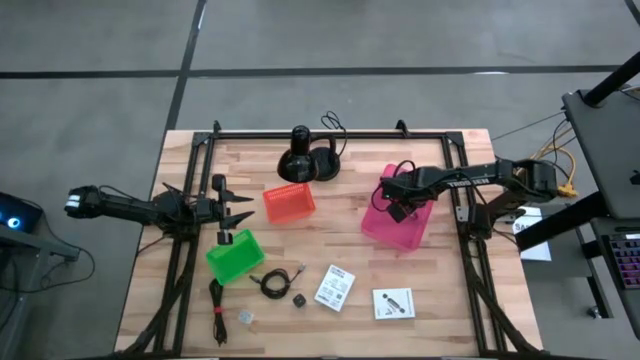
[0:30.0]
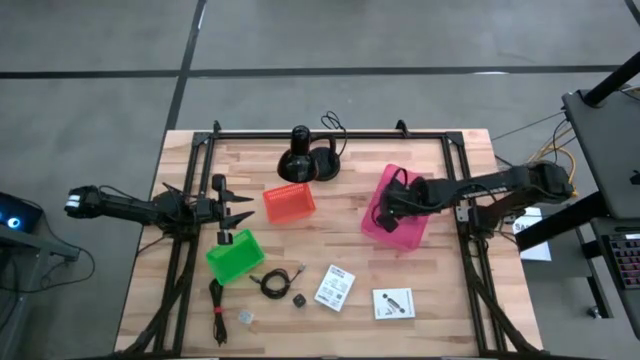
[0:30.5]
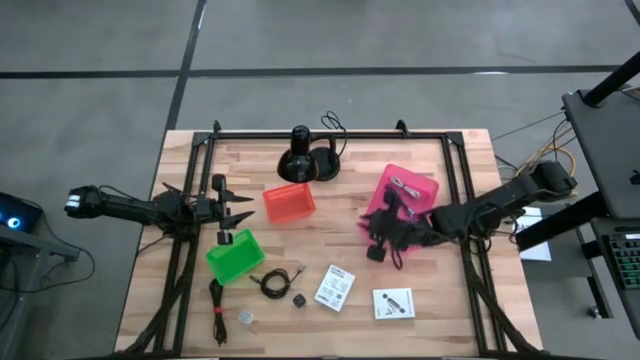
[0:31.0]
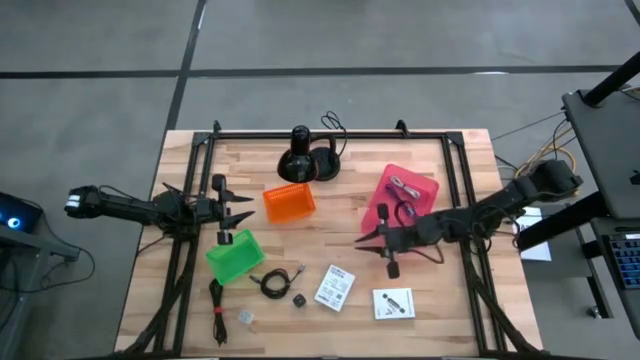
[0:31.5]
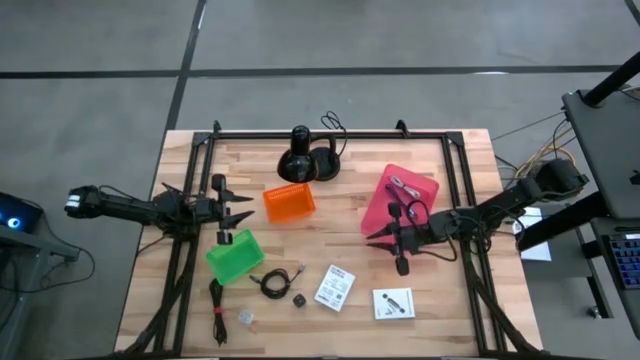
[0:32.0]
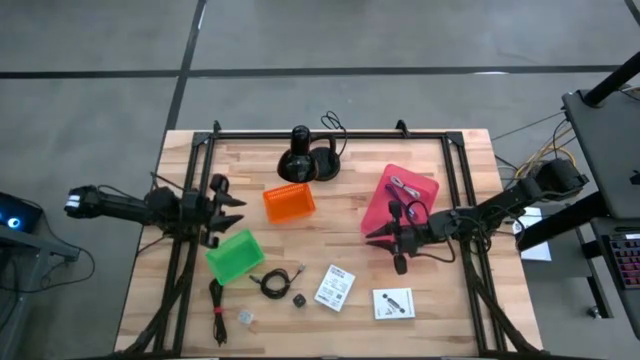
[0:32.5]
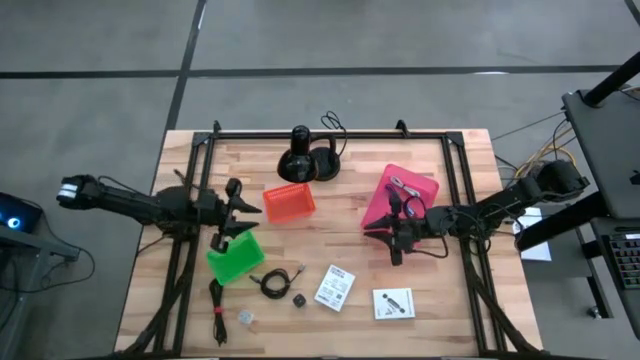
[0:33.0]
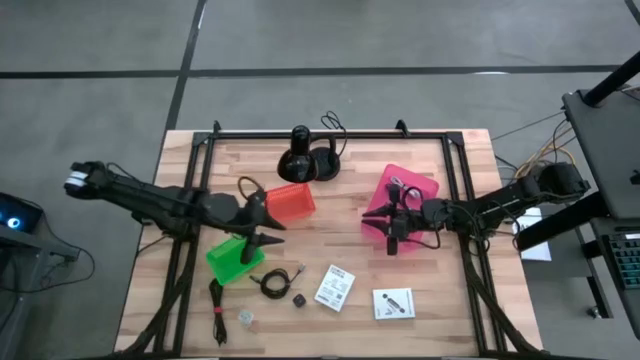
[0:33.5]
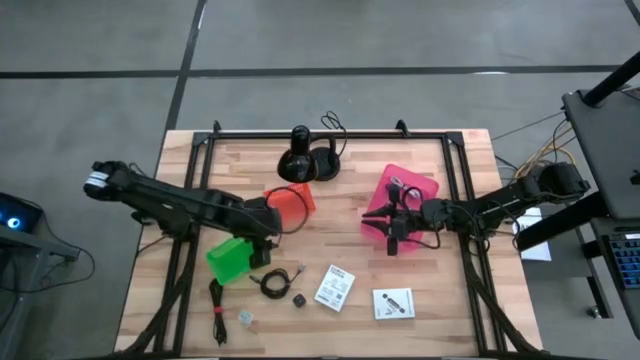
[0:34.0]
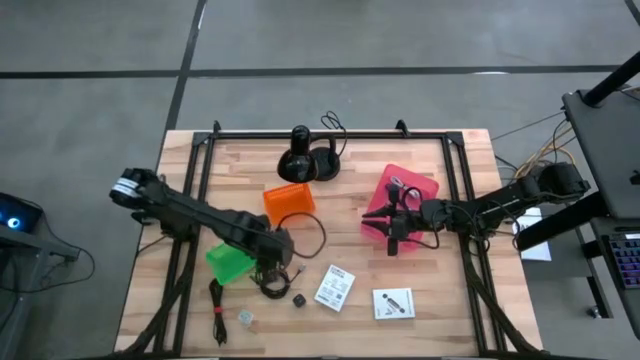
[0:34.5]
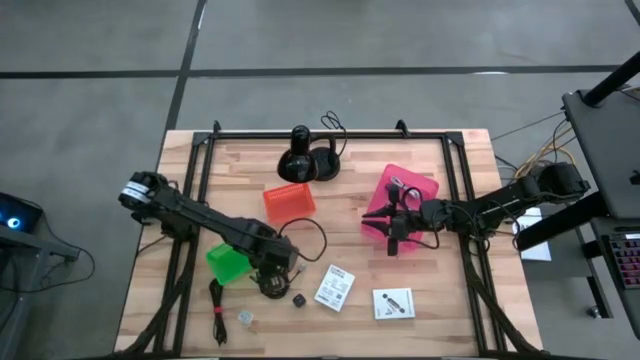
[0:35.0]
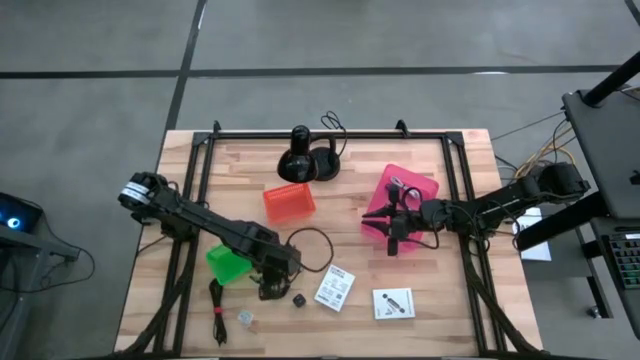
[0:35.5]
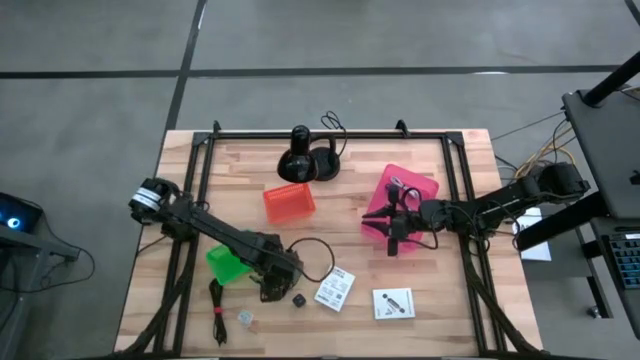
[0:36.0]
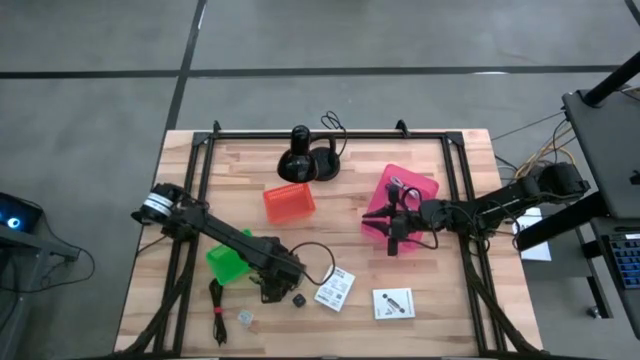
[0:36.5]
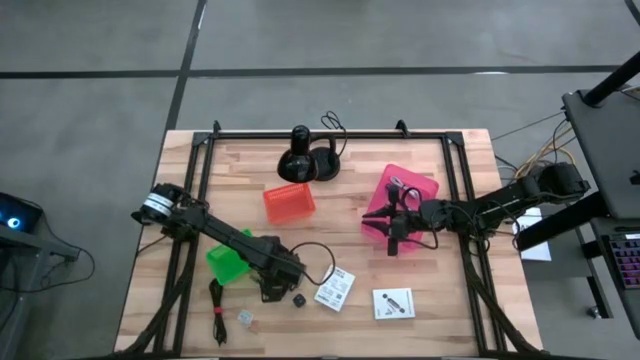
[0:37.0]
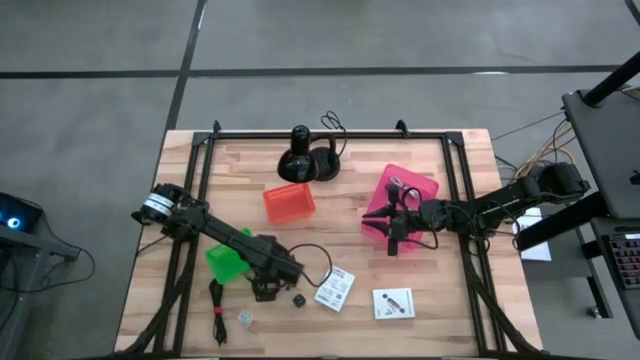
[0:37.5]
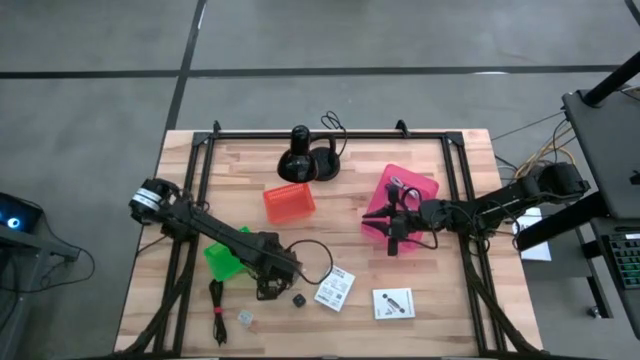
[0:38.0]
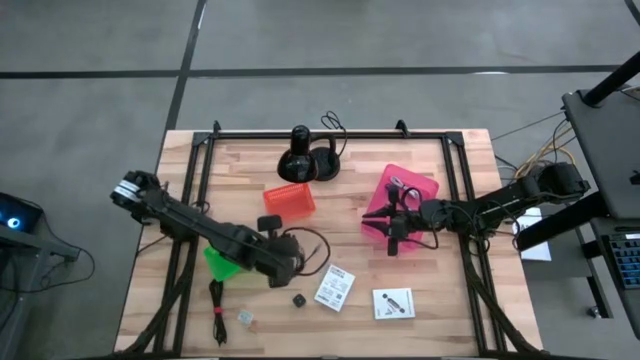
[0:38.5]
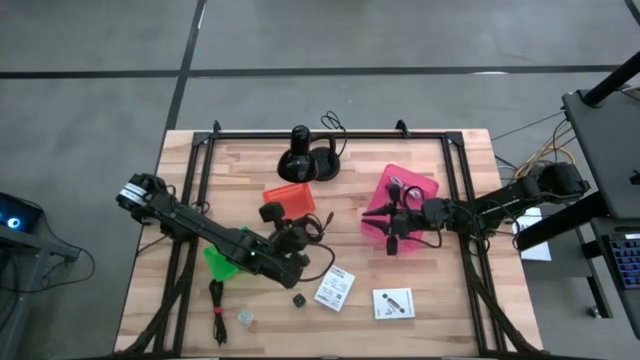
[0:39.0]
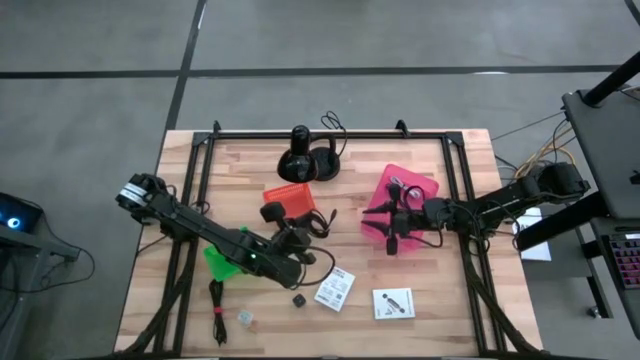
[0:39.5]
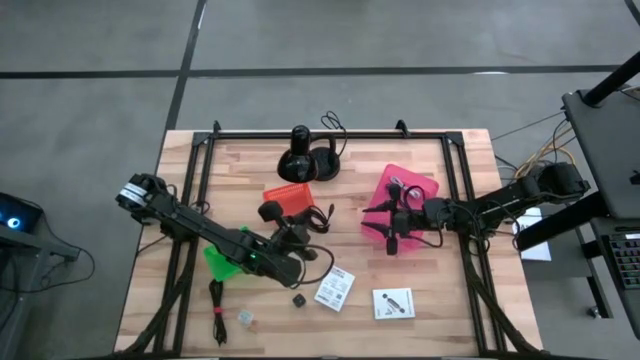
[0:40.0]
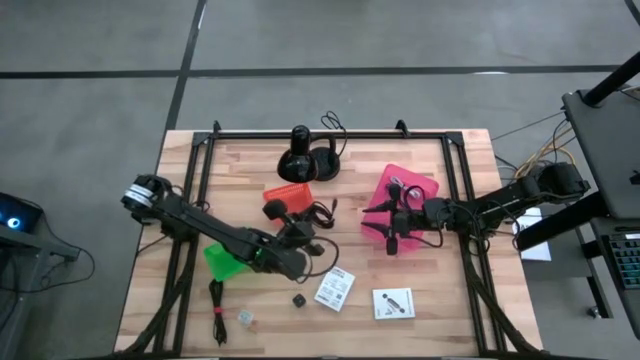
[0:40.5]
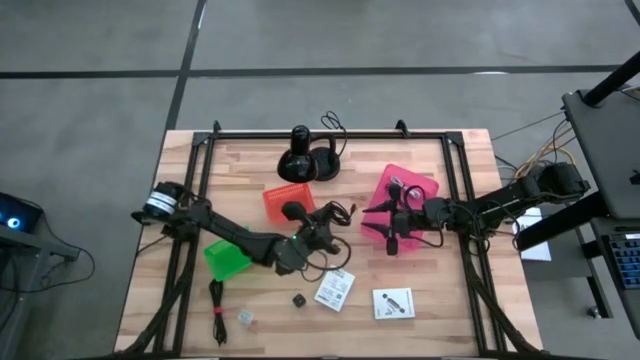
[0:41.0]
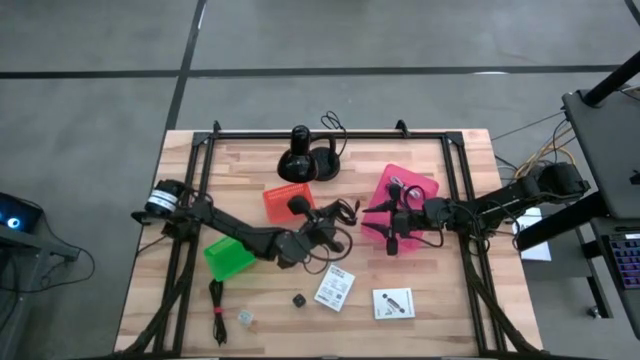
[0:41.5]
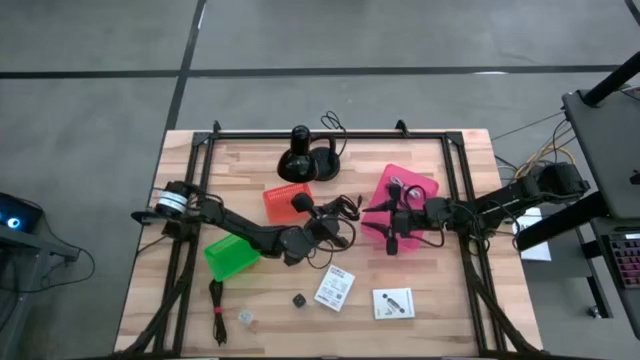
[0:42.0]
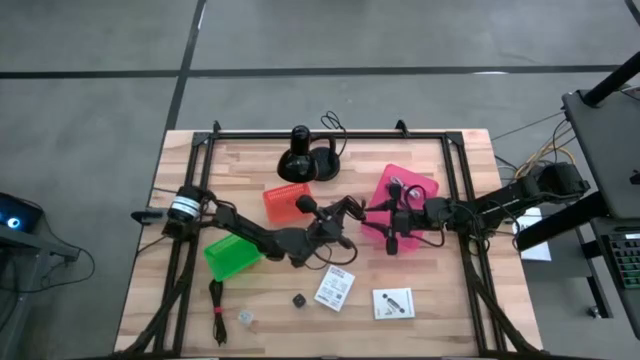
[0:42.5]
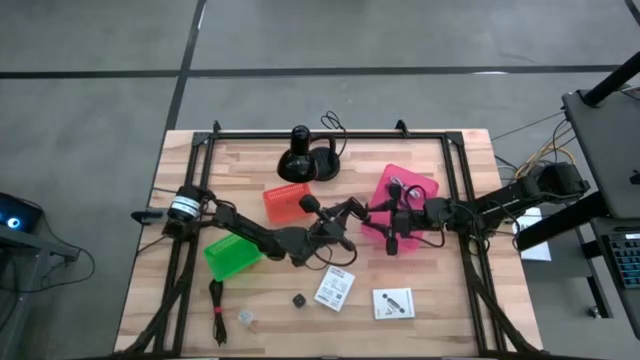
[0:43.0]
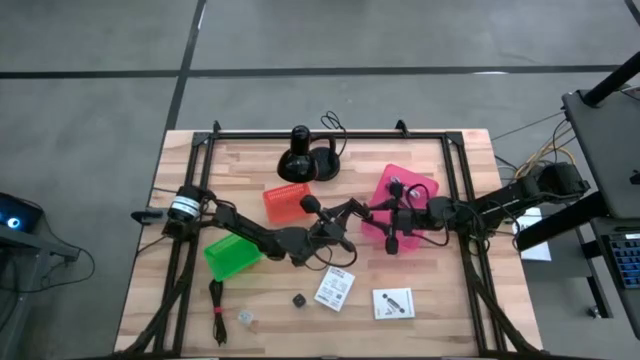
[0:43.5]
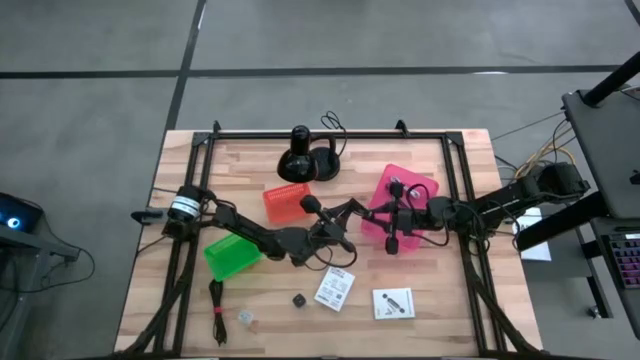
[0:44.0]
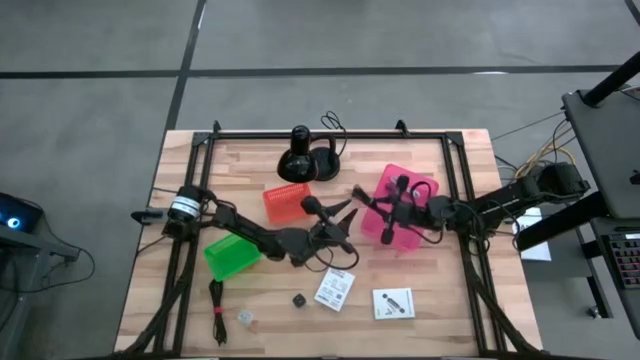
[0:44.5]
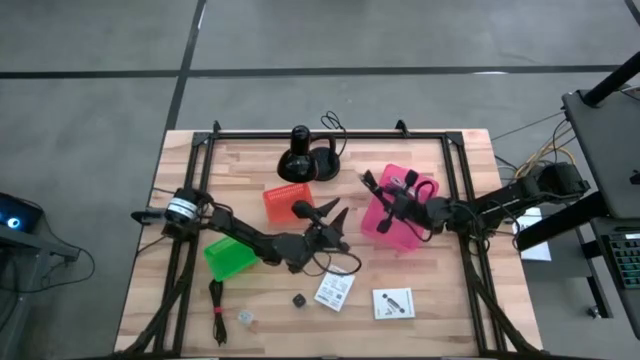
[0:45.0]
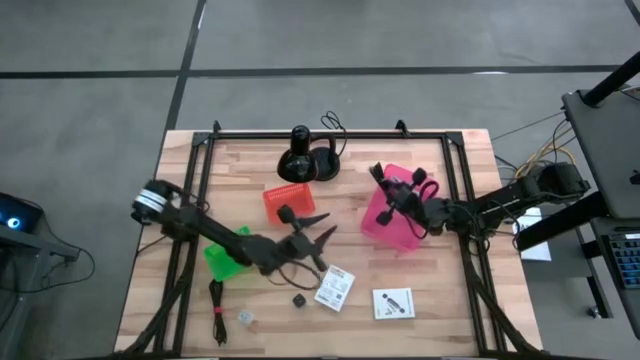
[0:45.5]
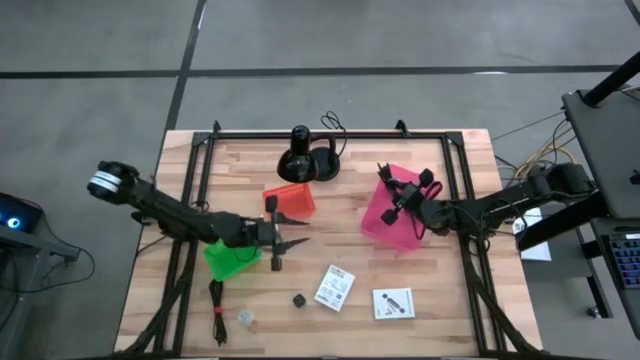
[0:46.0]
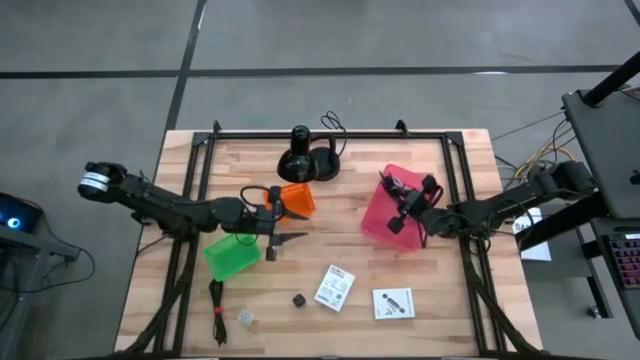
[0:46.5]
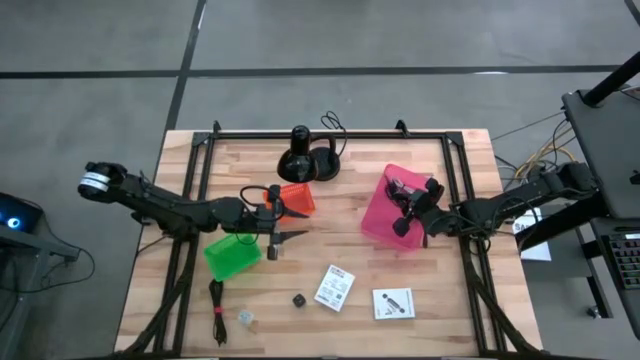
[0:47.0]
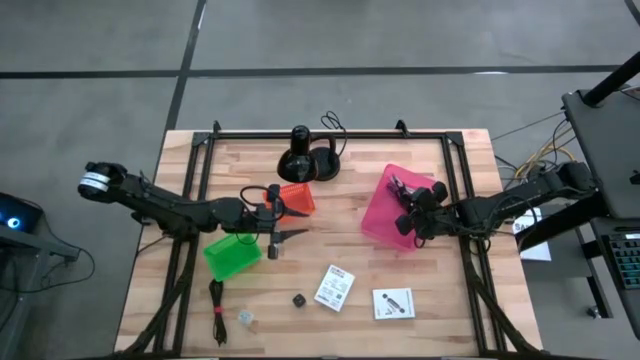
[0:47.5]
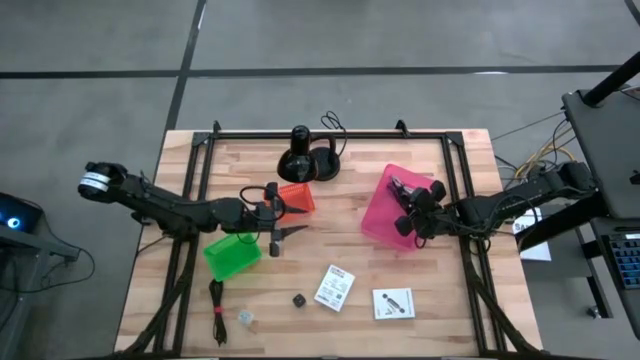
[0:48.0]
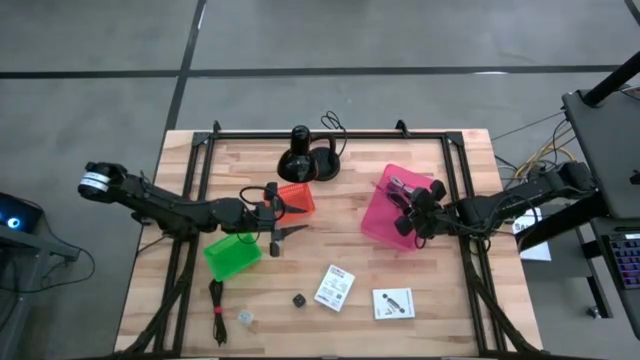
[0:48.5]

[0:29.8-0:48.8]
Task: Pick and place items into bin
Put the top black charger cable into the pink bin
